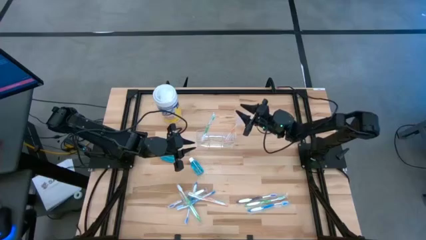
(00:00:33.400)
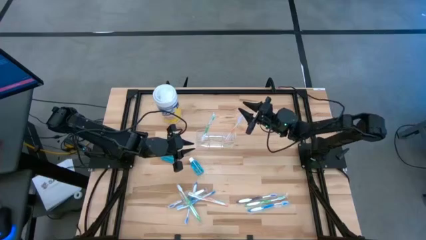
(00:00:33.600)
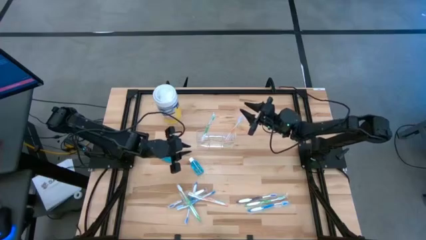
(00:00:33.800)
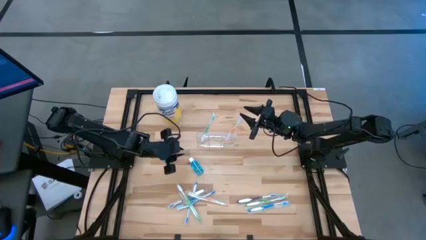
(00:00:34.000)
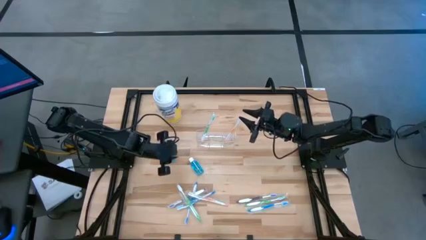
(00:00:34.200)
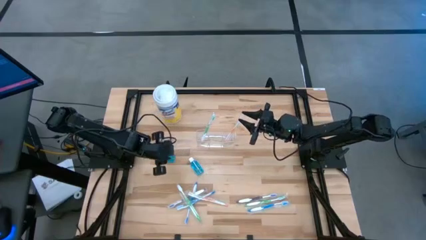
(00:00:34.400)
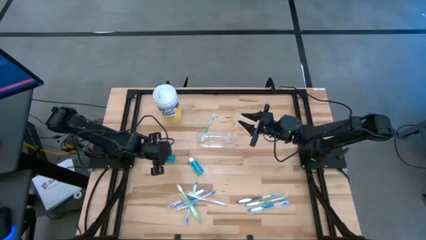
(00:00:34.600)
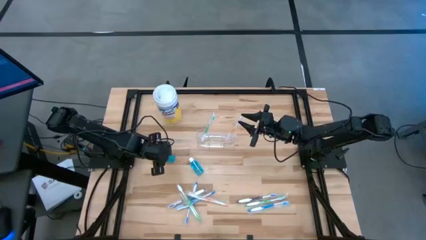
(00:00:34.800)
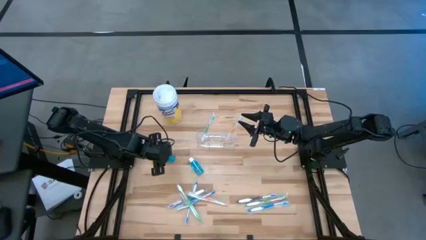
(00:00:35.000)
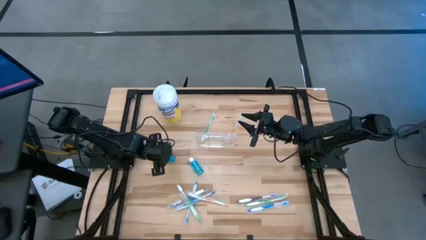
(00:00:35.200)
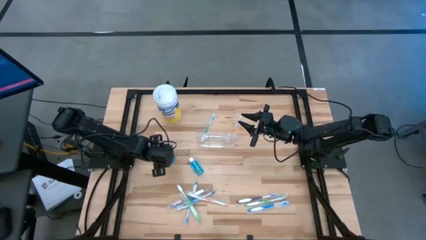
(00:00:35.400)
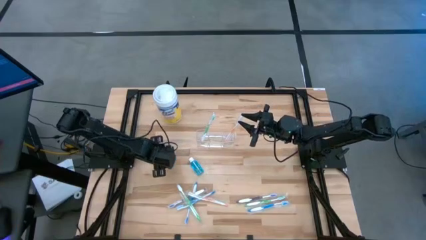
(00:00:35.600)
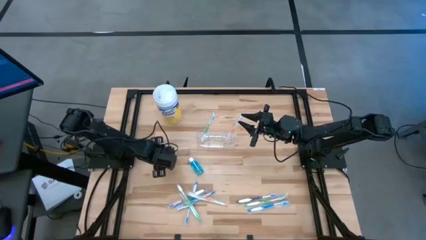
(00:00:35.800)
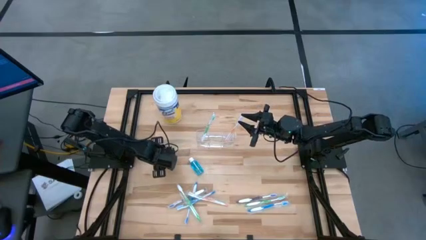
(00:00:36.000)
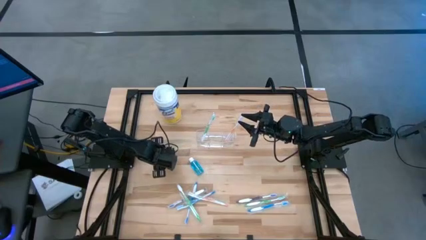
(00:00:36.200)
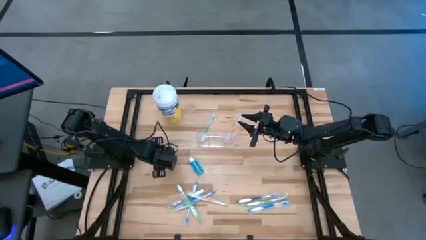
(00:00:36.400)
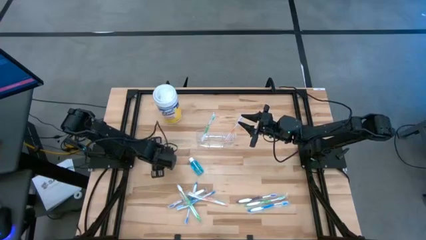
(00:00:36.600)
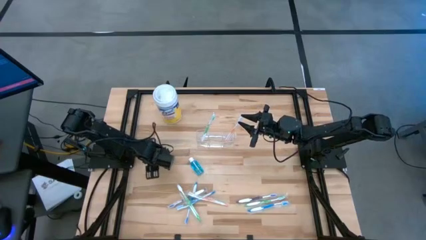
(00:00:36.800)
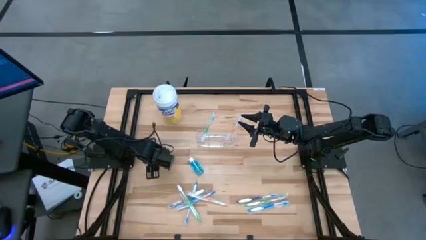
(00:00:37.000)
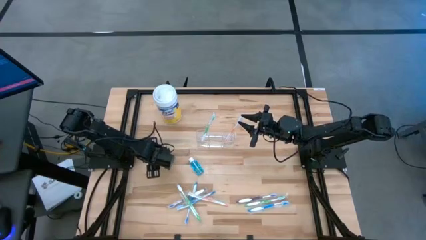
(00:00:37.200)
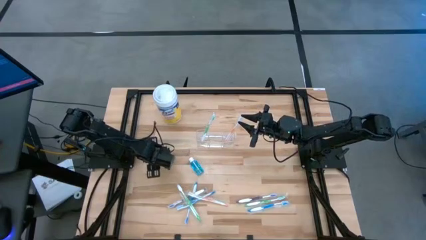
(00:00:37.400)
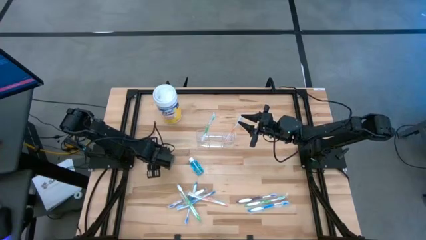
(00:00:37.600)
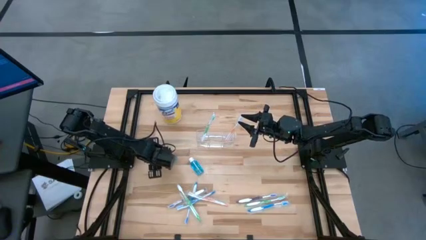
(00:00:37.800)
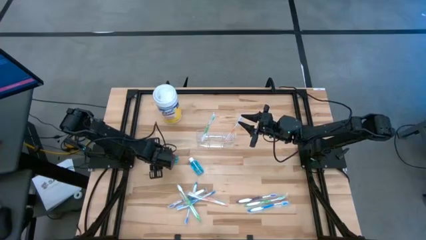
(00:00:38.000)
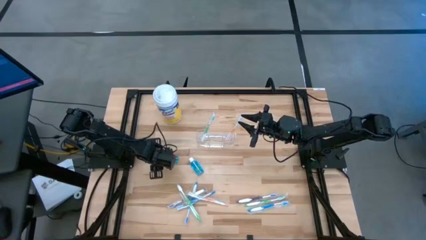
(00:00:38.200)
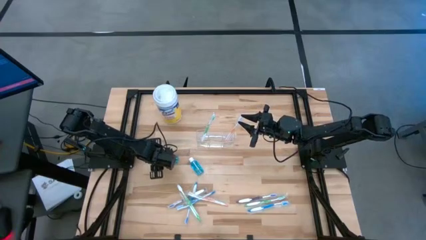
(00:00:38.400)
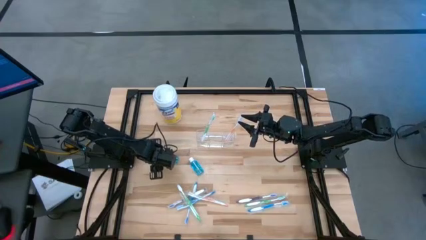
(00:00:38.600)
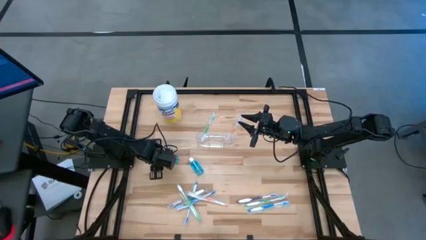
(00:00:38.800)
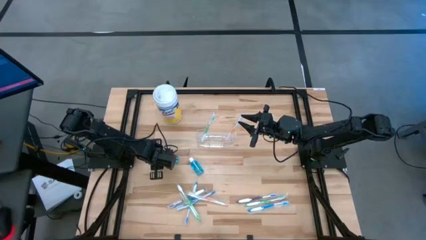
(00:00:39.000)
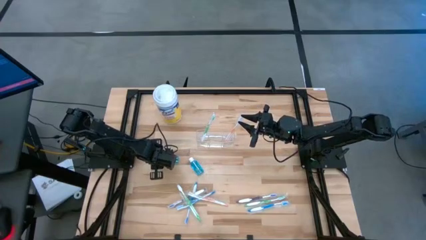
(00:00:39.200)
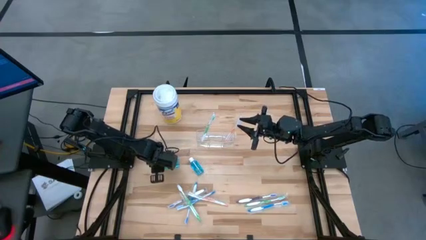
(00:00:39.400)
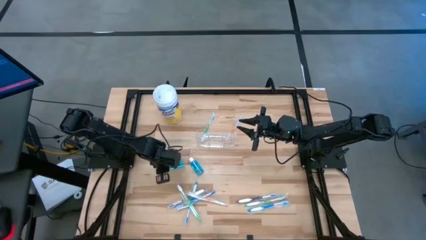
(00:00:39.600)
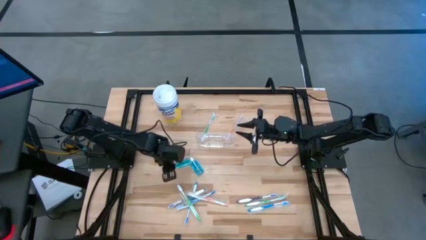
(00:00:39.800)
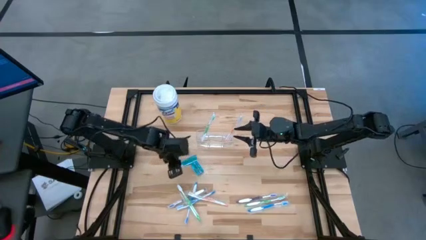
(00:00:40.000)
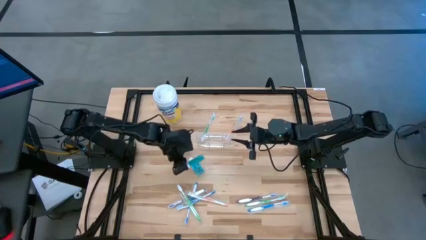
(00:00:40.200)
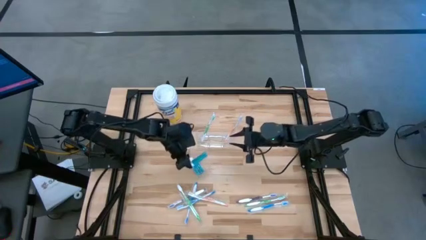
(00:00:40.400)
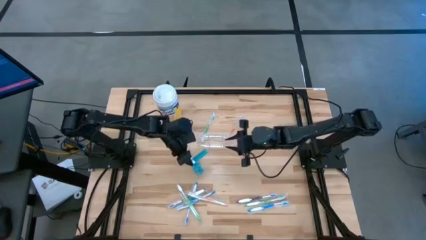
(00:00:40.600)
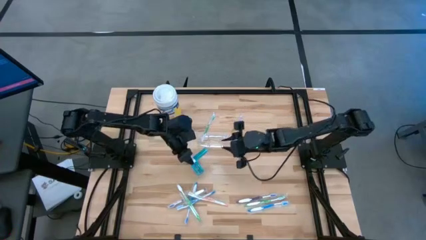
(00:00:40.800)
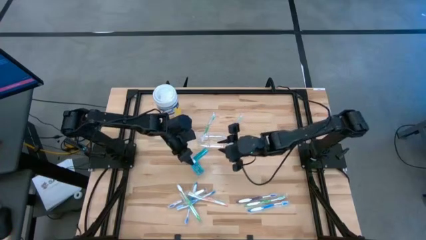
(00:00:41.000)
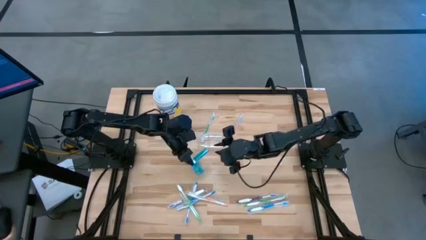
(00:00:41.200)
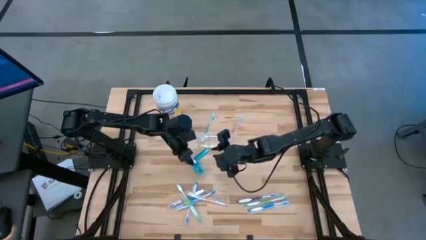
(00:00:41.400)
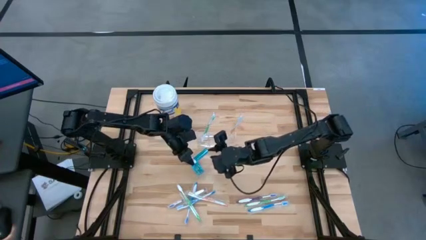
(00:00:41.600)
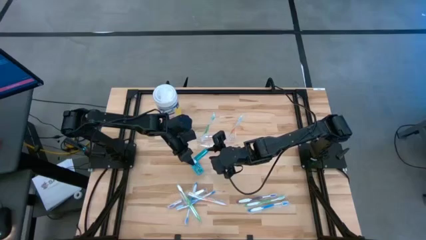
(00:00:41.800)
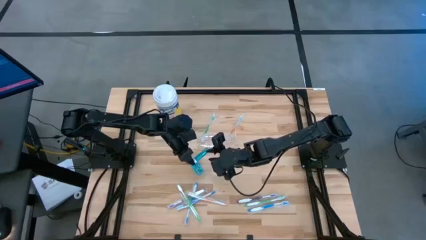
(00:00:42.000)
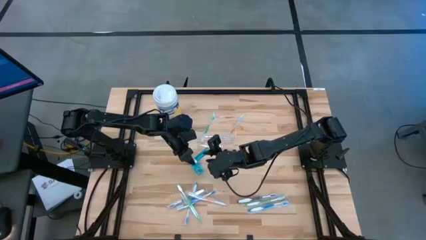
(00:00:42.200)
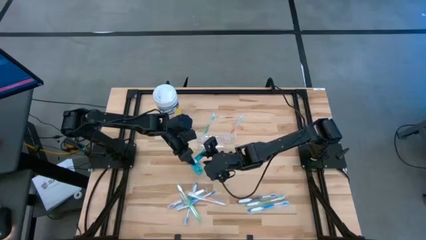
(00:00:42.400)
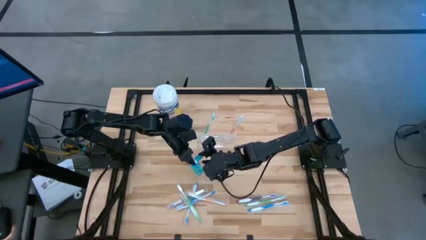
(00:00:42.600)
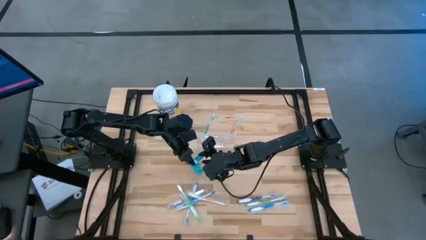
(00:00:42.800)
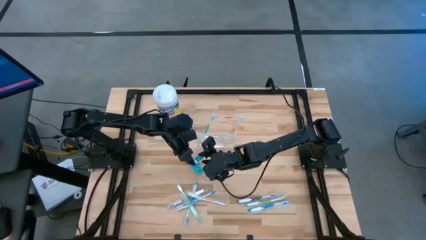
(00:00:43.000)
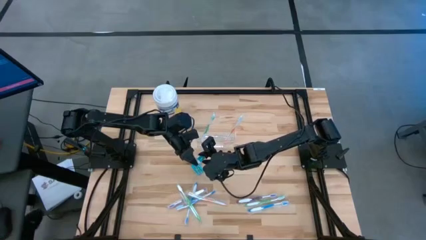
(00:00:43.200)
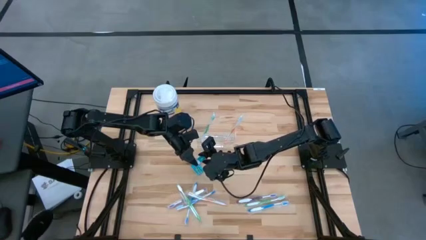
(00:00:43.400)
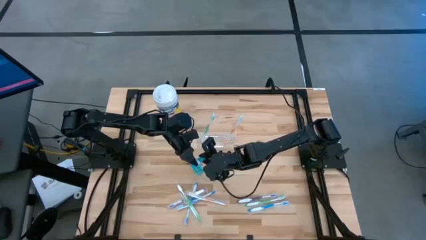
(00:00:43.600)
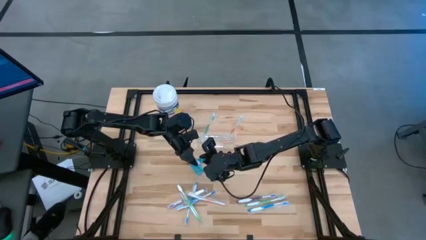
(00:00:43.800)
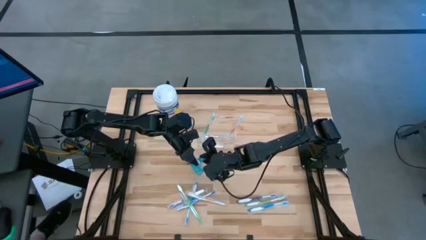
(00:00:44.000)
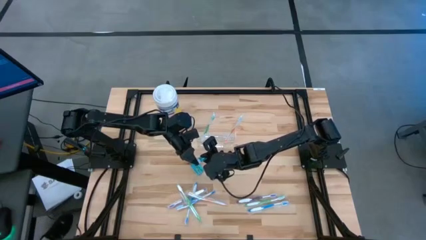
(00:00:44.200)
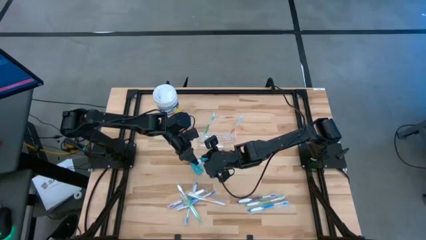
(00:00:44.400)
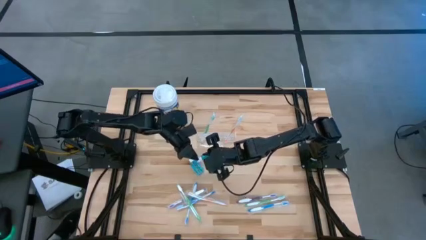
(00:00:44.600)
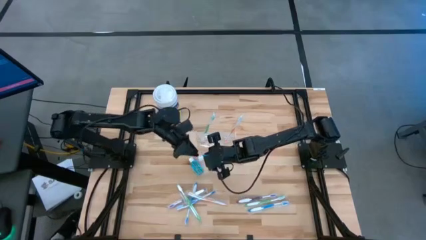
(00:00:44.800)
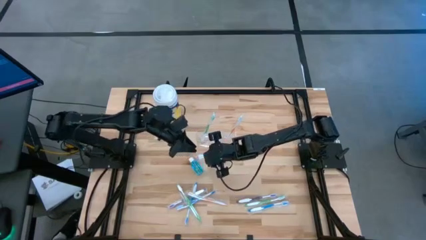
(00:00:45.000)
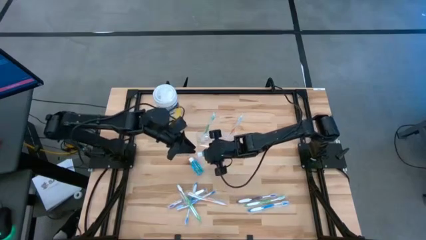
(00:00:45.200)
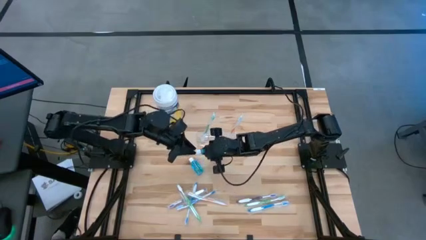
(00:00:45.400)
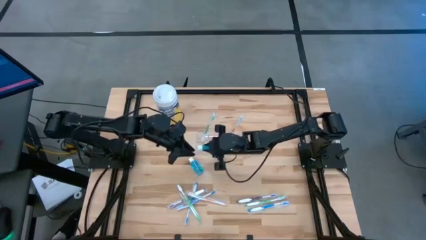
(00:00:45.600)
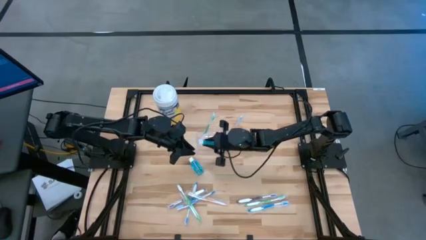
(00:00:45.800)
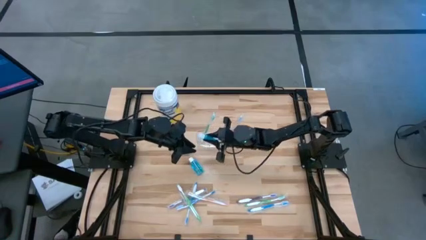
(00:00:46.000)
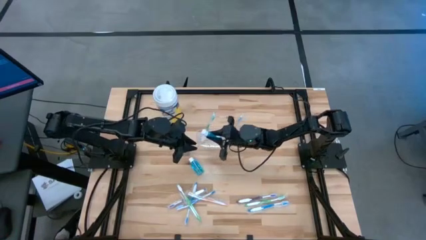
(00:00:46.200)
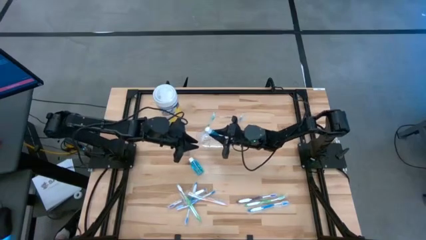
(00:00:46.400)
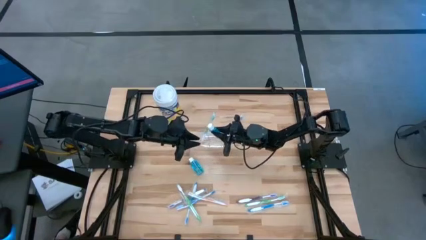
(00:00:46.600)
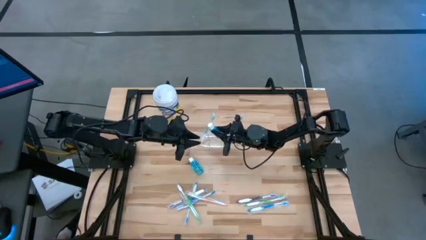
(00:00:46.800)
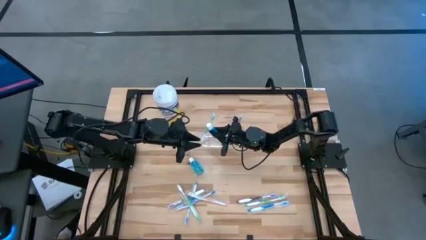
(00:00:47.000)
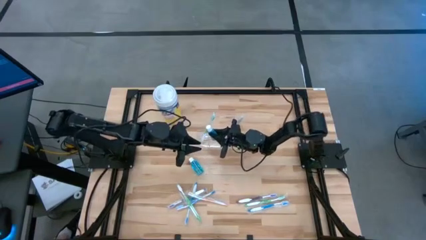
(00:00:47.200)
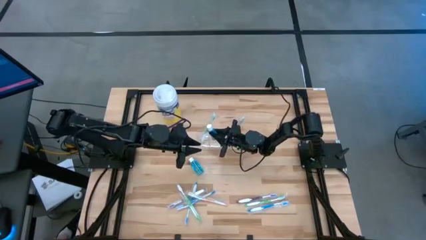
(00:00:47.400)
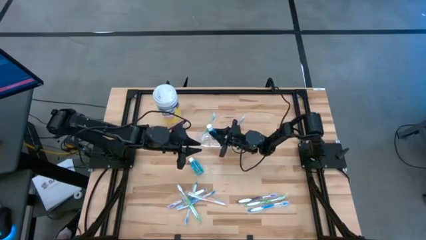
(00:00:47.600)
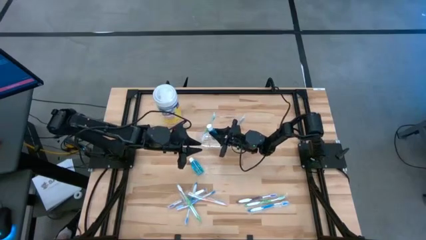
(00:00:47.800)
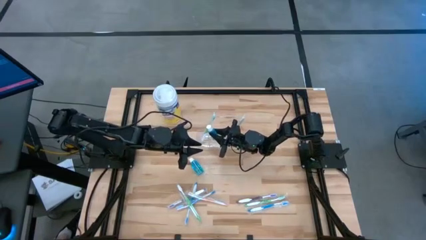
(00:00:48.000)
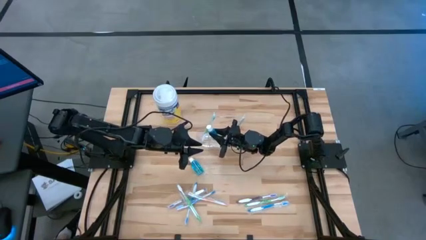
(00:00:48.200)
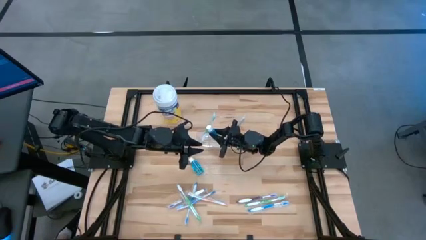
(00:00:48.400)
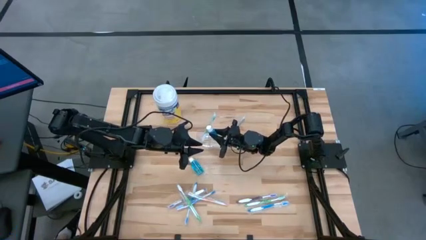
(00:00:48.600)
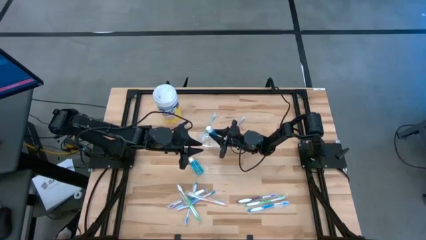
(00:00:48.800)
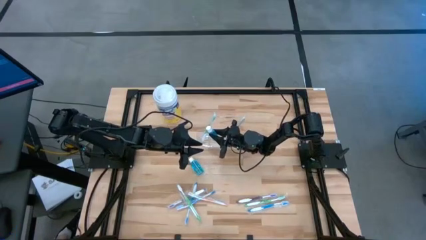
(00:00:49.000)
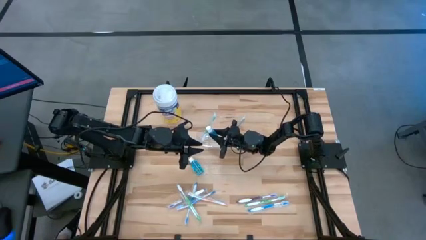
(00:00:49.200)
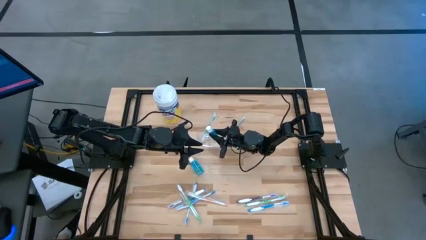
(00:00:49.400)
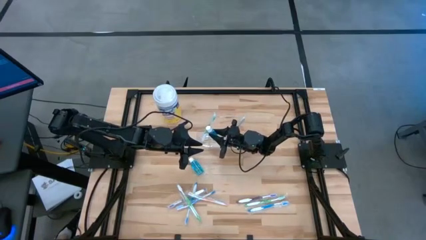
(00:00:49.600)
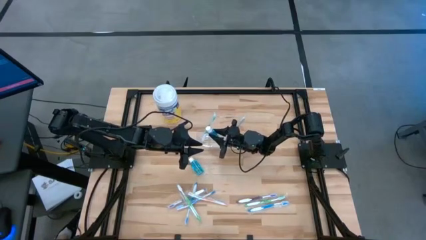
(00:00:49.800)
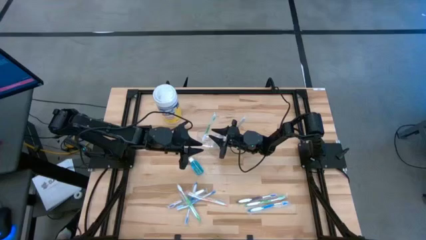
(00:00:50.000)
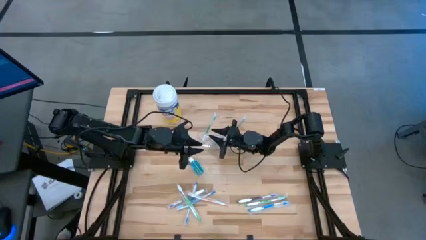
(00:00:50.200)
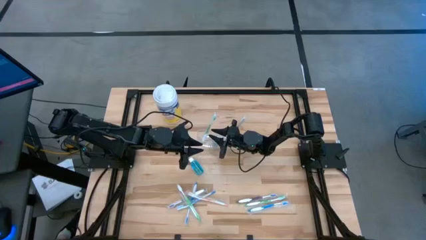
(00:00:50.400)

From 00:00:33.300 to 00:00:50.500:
Task: Pick & Place toothbrushing station
Put the left blue mouthwash into the transparent organizer
